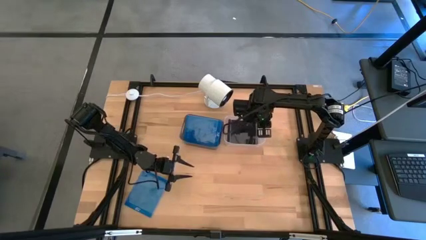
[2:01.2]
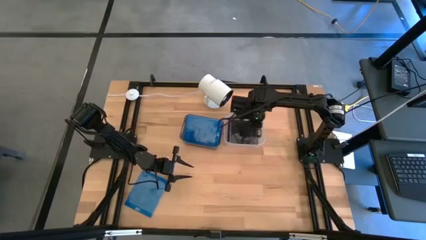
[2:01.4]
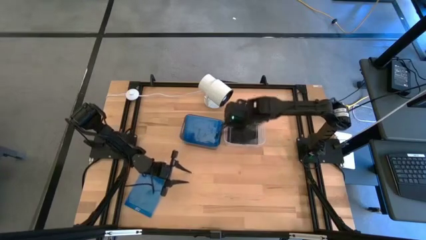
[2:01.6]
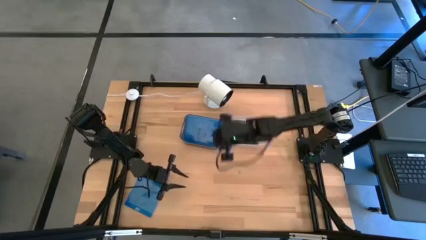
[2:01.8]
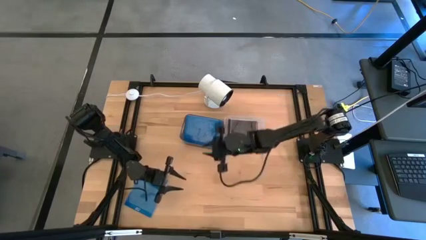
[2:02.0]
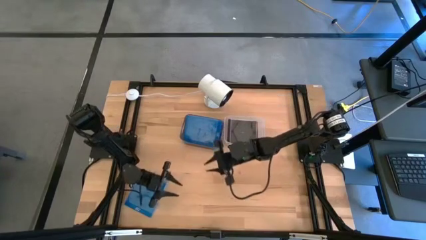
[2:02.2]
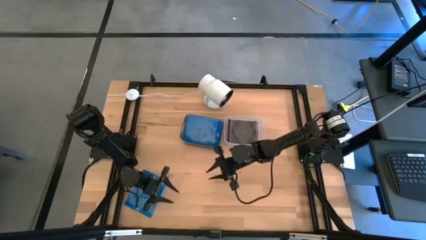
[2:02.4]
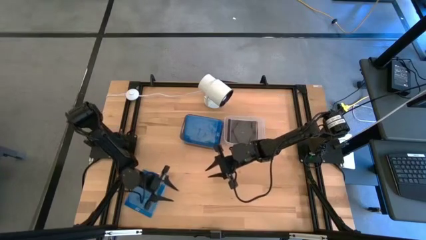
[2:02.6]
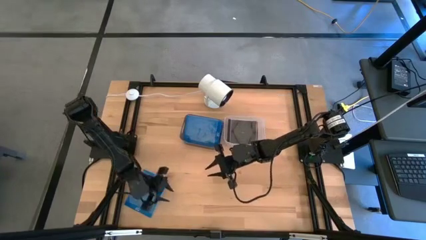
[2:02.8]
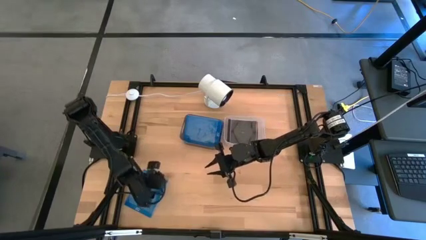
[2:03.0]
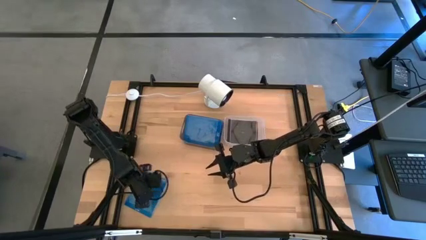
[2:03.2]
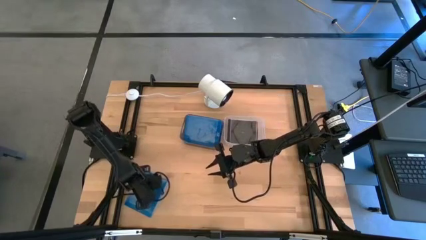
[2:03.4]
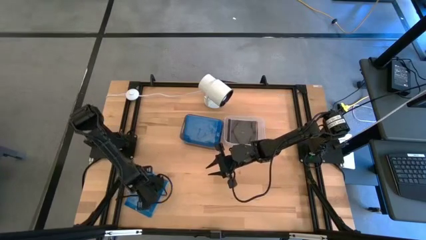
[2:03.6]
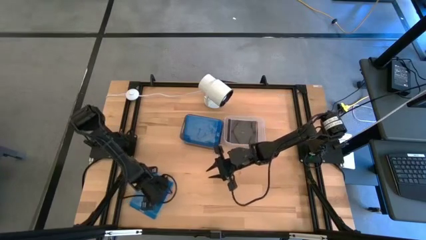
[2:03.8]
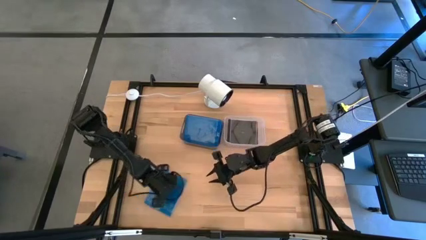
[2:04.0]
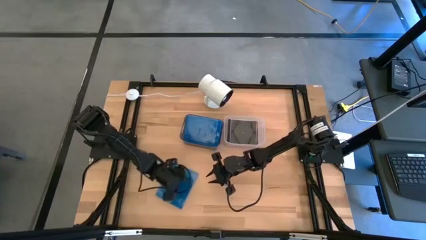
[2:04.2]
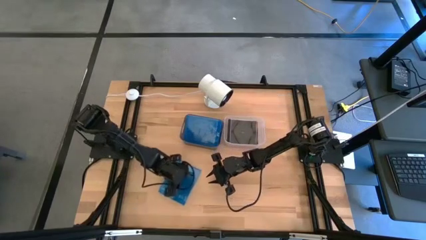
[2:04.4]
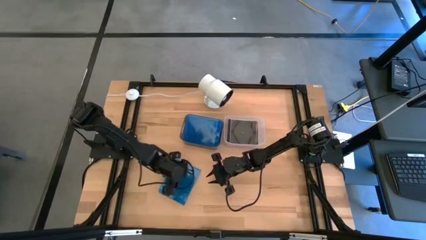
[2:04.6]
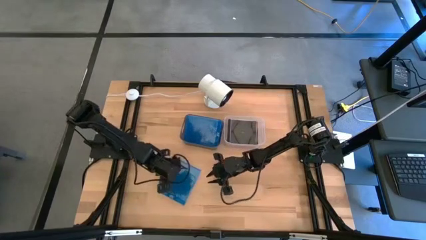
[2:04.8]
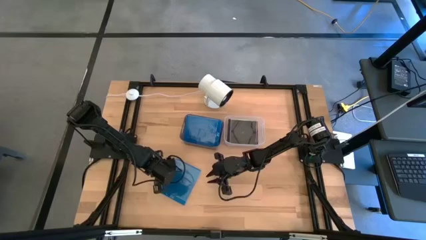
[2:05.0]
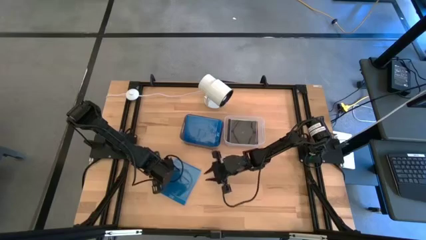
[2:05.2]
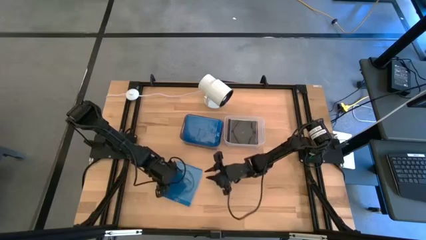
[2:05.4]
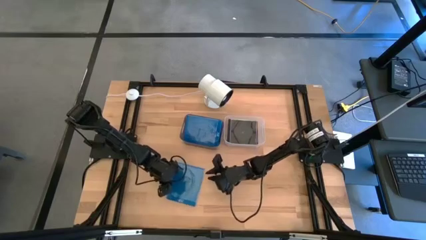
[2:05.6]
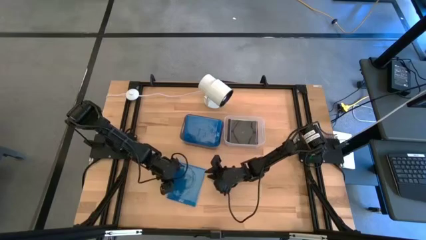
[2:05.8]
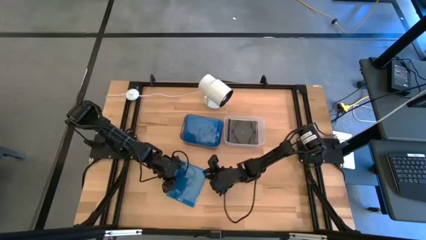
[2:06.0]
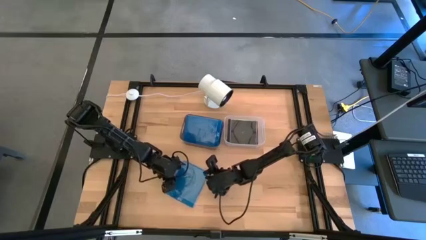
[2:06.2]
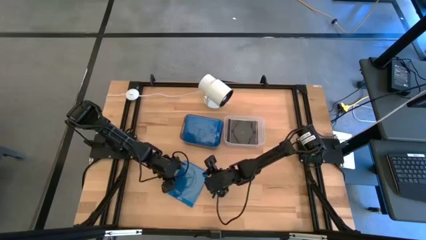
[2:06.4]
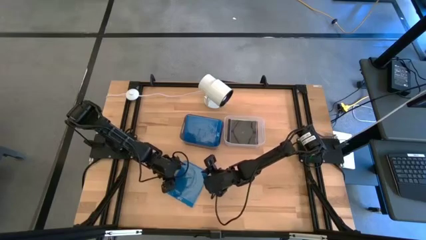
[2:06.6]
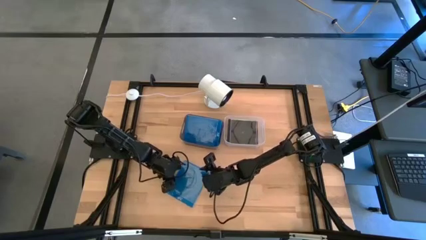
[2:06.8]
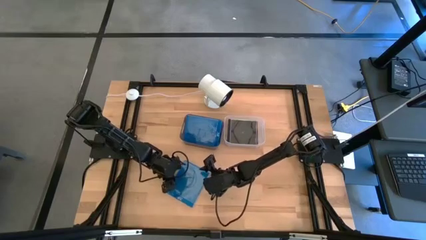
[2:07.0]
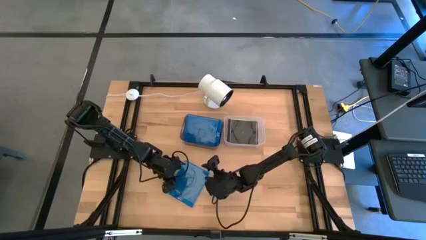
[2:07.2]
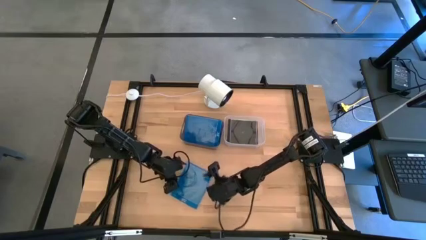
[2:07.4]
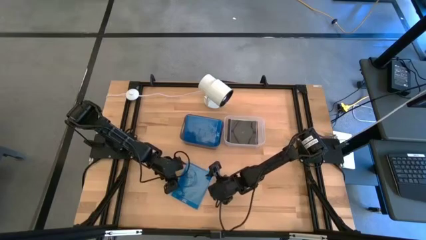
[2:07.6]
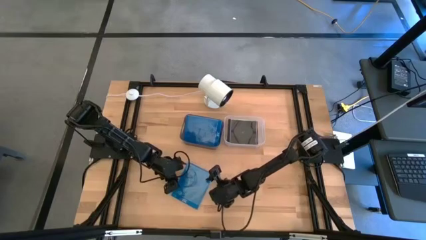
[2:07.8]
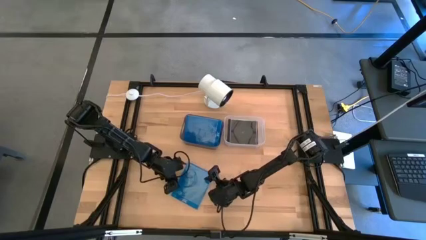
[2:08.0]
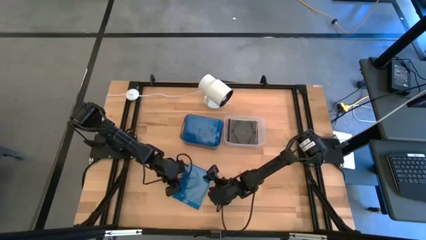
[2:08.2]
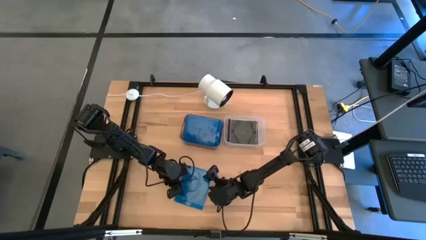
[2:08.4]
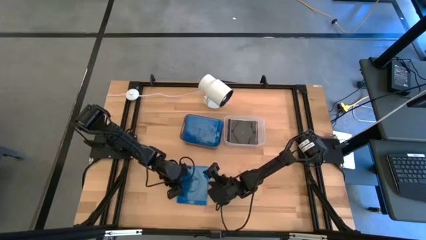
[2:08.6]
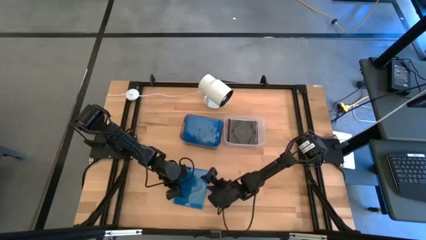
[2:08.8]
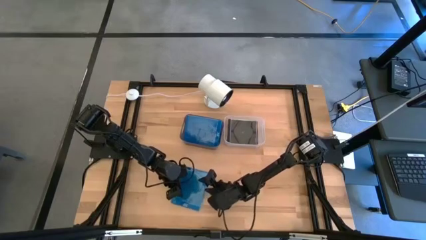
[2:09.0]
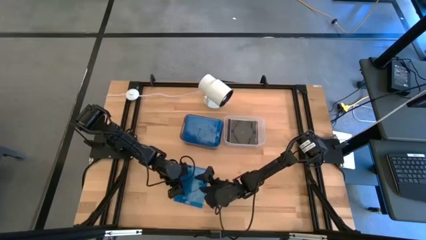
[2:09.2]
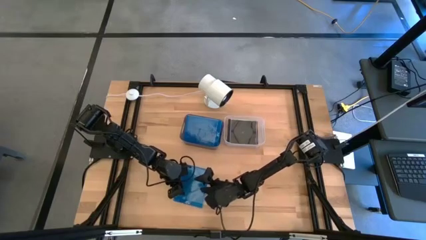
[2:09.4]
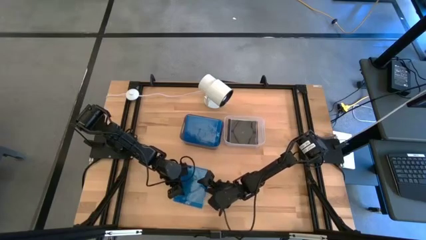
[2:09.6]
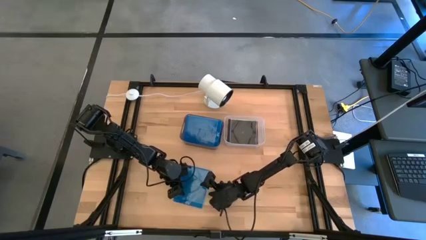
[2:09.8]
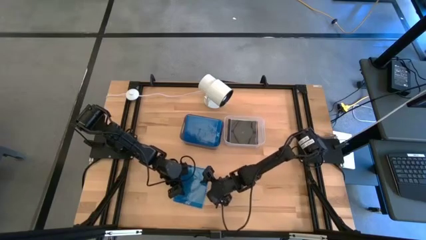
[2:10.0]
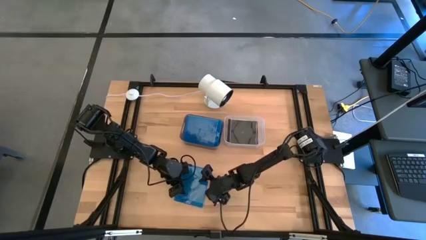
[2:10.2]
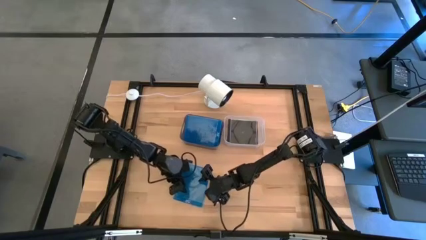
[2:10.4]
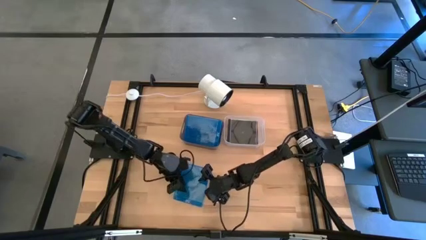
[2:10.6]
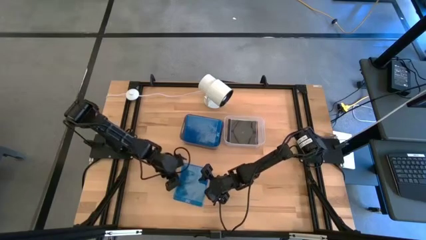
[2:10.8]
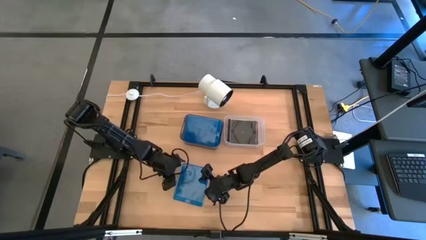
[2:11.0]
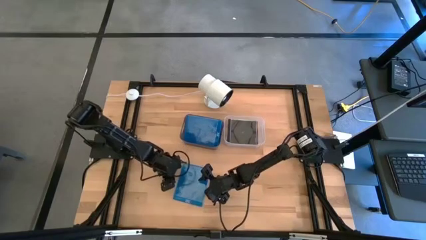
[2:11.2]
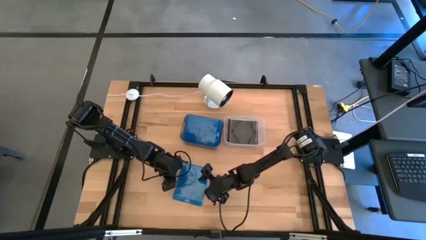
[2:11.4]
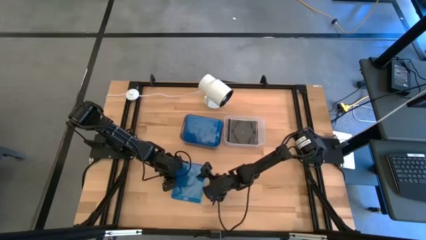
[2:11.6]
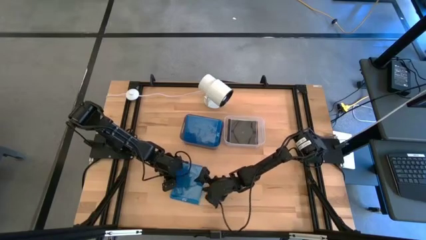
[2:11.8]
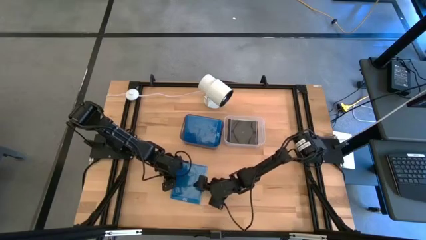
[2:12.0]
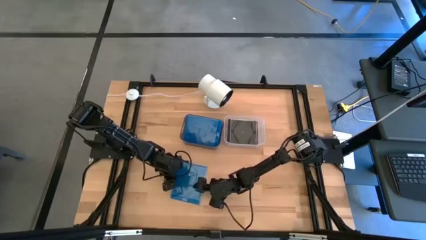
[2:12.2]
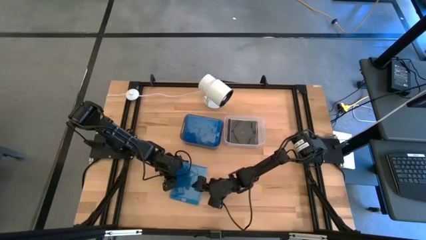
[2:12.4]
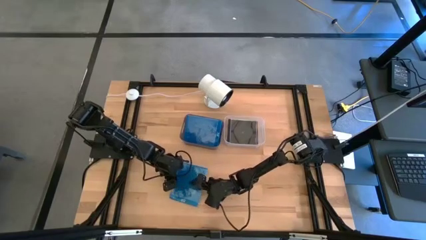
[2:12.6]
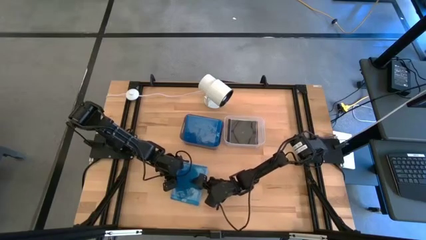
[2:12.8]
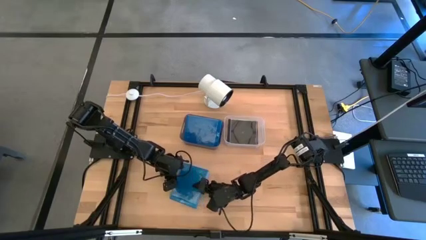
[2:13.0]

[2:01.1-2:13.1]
Task: Pick & place jewel cases by type
Put the blue cd case into the black bin
